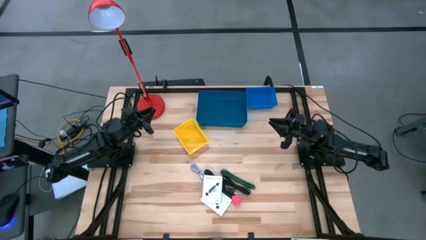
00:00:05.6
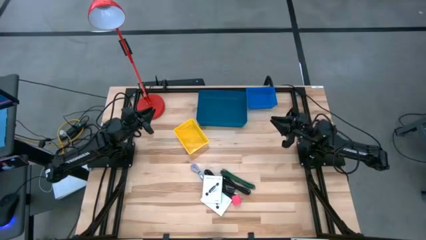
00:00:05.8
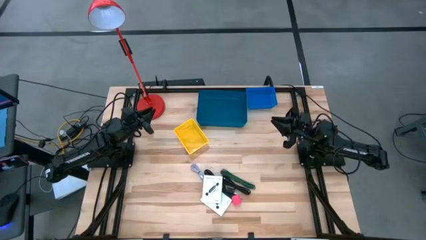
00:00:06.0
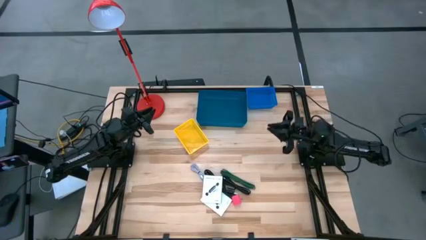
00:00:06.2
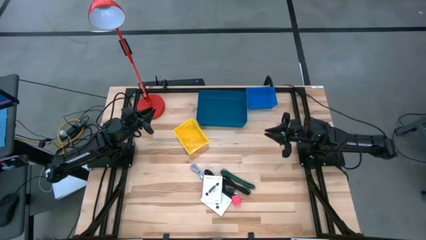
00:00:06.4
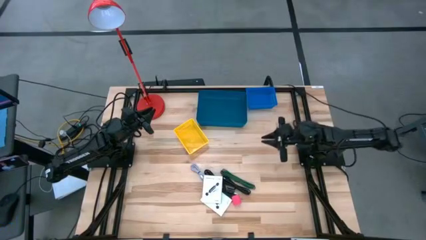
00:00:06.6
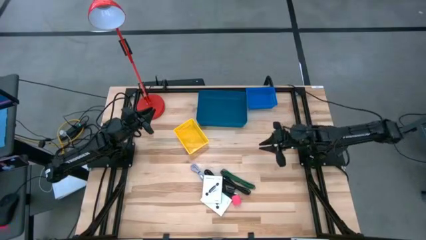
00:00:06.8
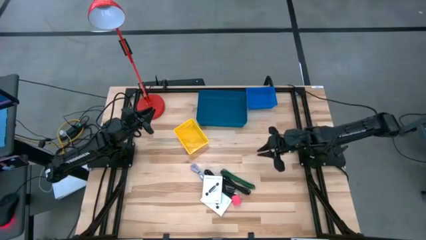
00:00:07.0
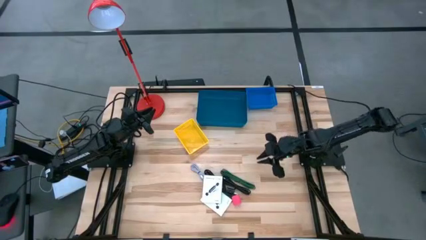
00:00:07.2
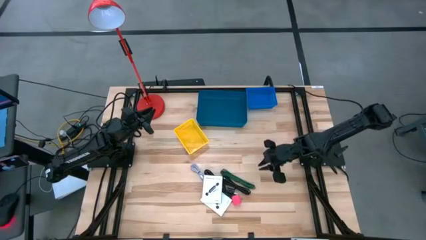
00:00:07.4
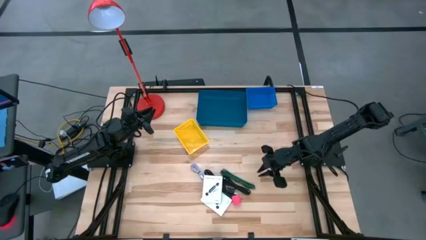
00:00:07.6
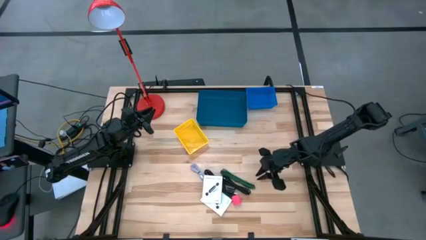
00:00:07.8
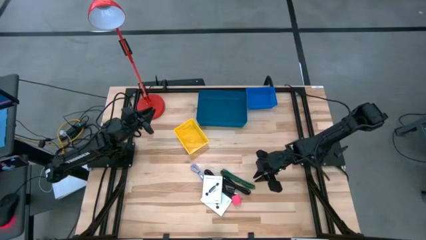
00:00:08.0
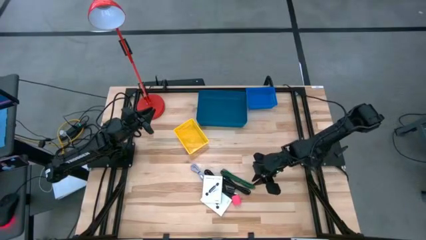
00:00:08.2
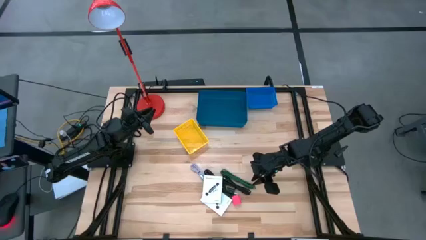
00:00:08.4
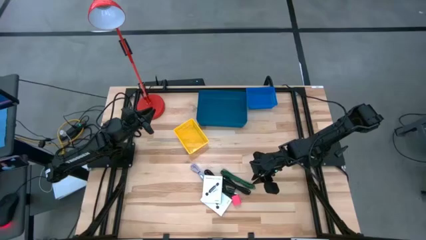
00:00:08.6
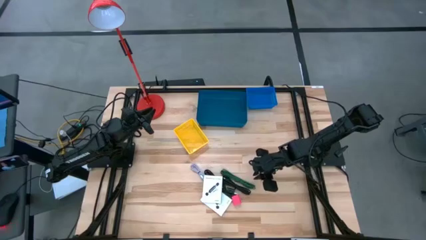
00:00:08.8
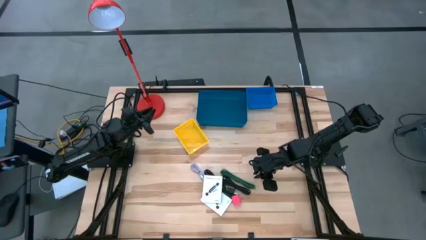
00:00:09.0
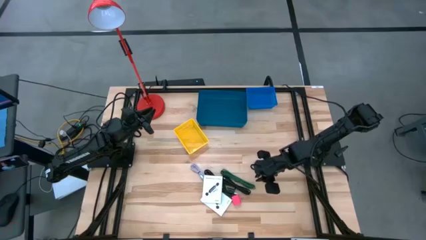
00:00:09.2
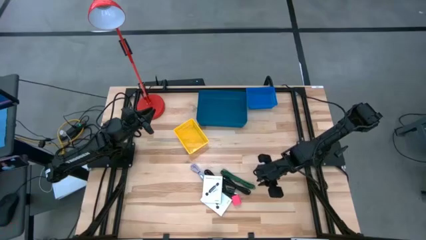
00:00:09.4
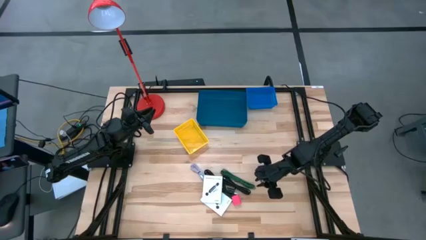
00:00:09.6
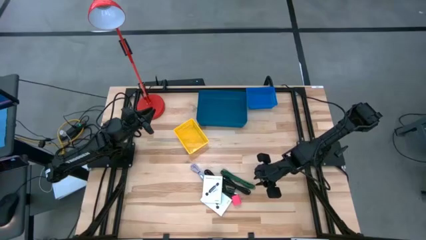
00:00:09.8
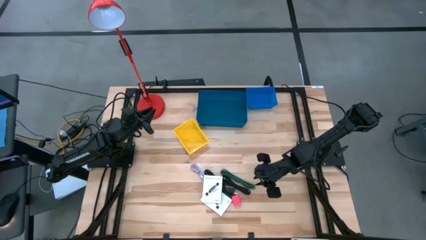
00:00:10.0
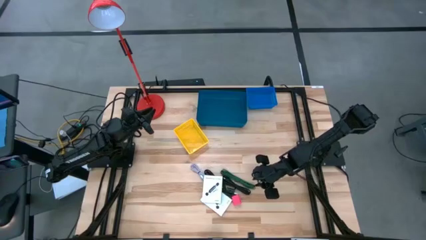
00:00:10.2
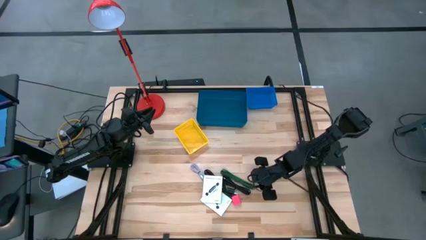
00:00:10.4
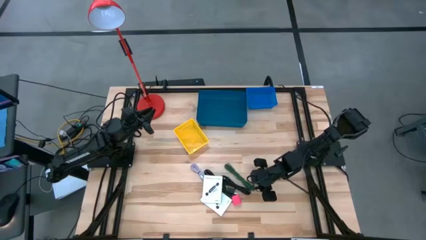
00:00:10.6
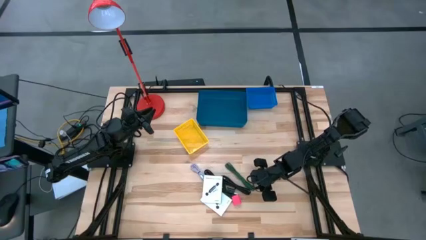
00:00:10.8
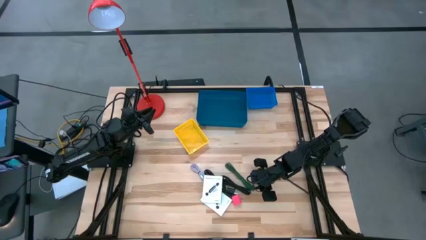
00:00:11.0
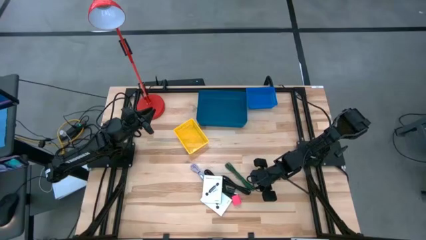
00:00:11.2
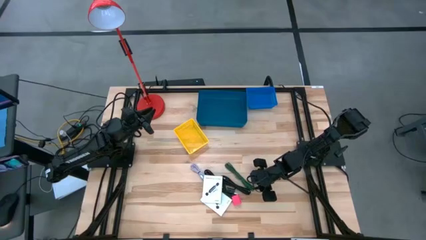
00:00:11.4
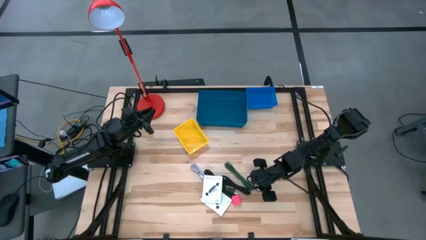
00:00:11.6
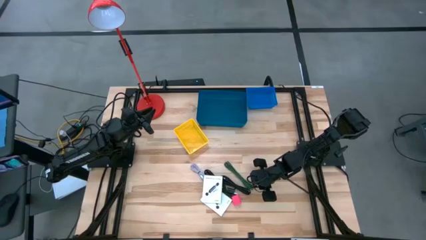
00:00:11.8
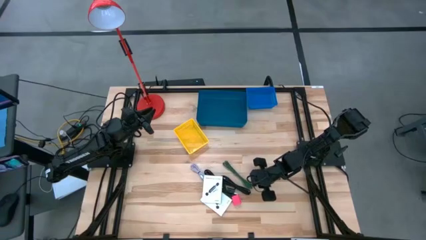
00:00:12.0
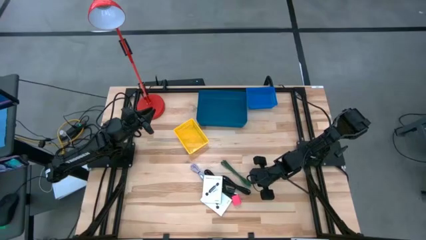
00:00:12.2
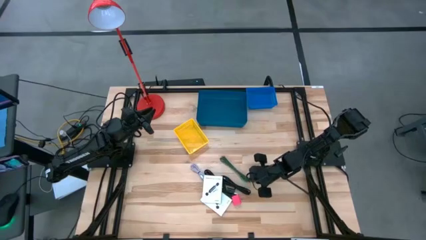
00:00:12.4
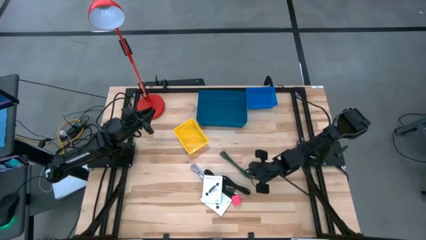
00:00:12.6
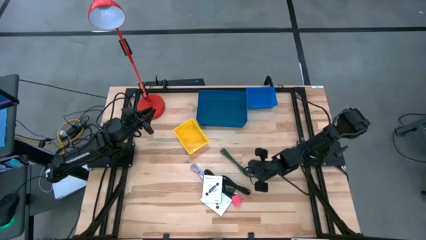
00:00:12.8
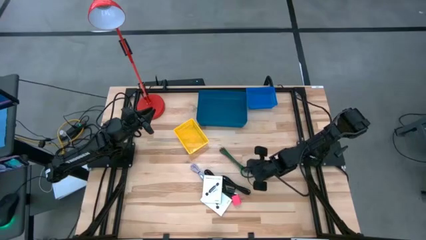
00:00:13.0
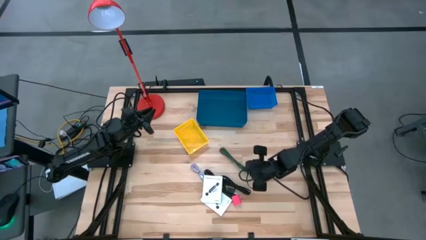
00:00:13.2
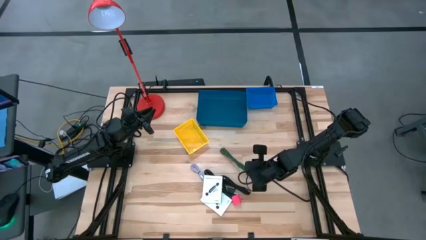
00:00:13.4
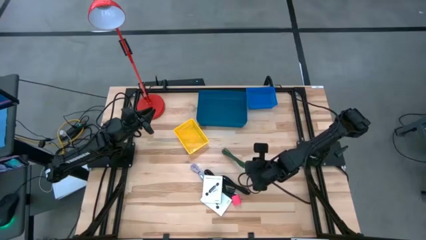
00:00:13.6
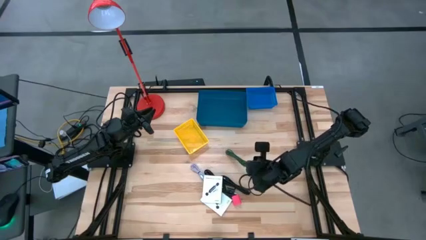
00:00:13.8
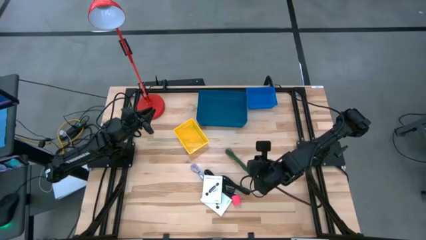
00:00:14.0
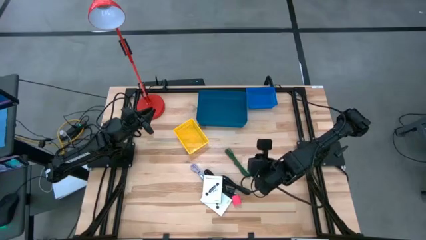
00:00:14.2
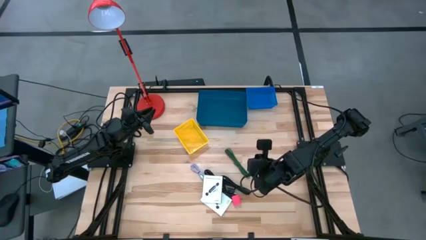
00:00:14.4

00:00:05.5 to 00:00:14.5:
Task: Pick and place items into bin
Put the green charger cable into the dark blue bin

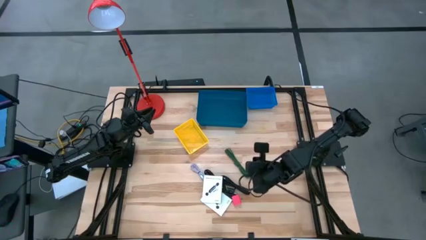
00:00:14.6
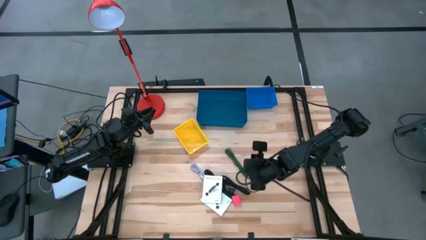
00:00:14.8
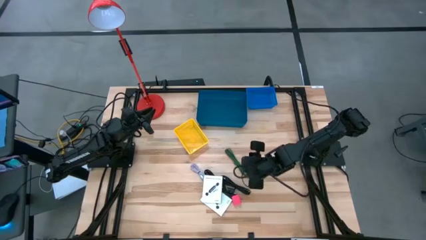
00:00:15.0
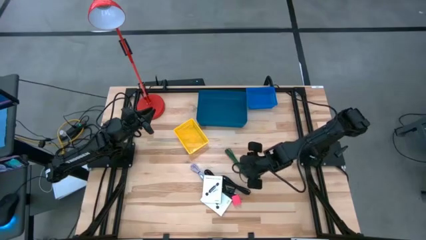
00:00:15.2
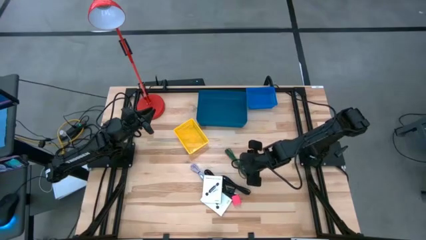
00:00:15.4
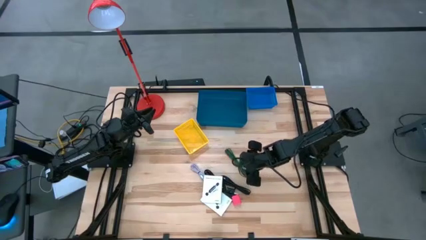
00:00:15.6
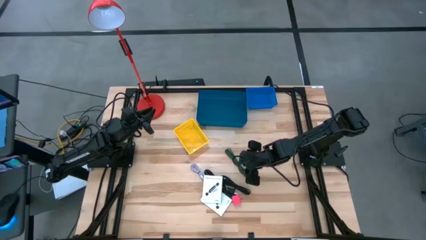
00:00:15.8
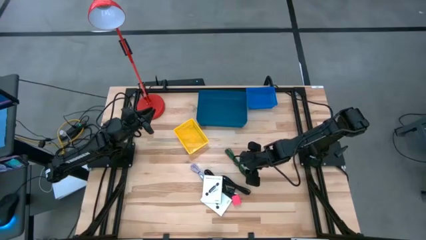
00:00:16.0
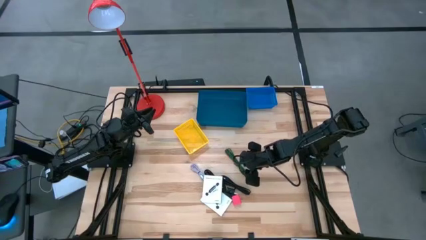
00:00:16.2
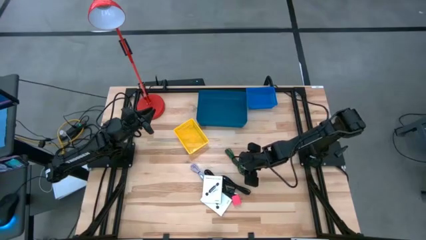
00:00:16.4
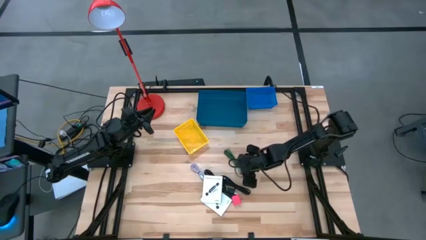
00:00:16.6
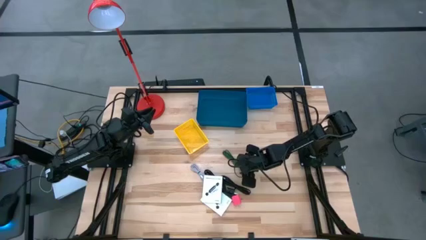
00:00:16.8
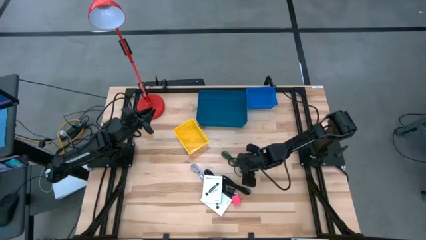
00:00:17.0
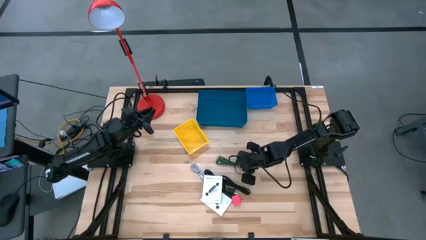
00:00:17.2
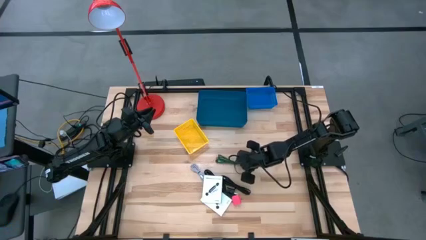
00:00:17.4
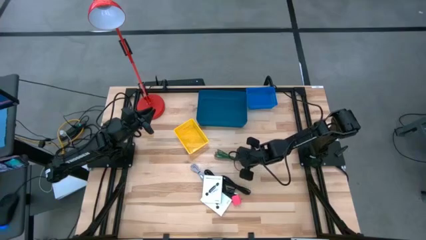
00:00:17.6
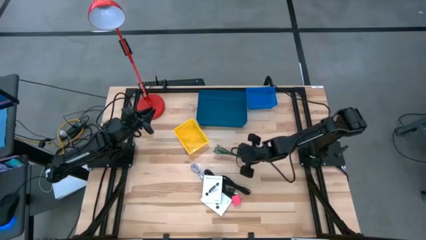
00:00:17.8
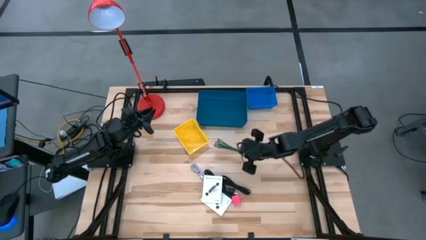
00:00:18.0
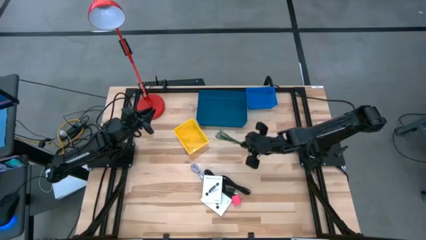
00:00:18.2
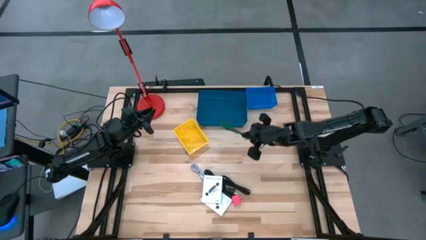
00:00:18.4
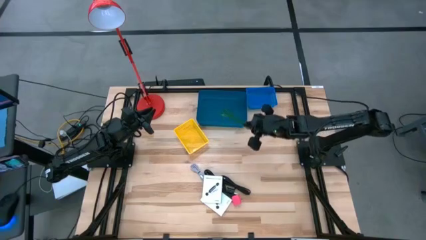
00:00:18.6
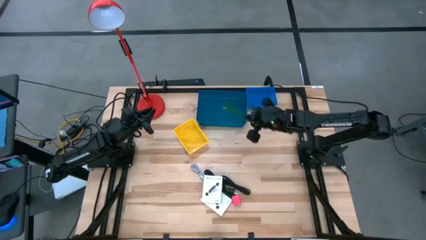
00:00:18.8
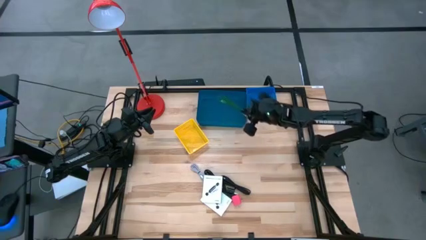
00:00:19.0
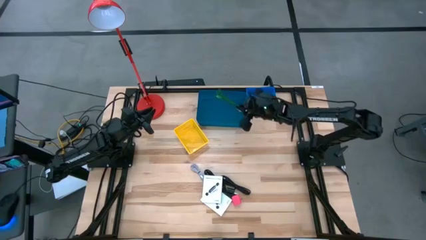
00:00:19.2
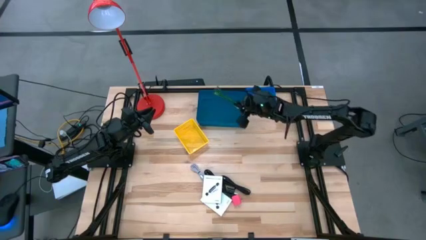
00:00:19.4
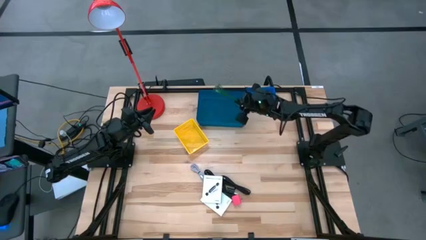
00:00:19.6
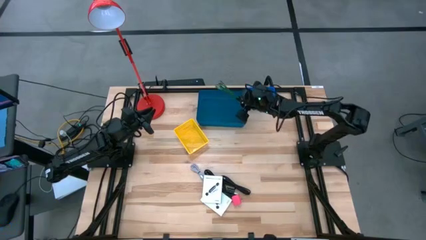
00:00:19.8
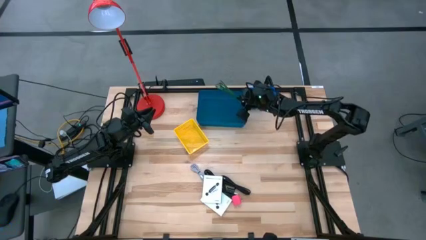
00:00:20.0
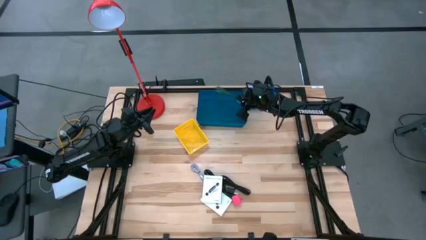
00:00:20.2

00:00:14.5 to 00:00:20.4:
Put the green charger cable into the dark blue bin

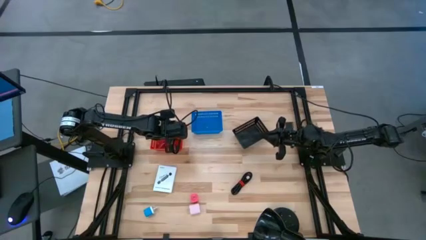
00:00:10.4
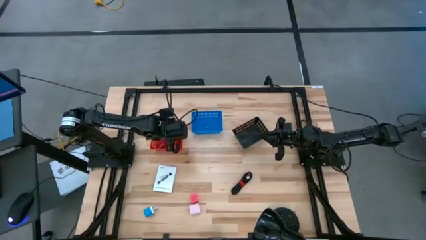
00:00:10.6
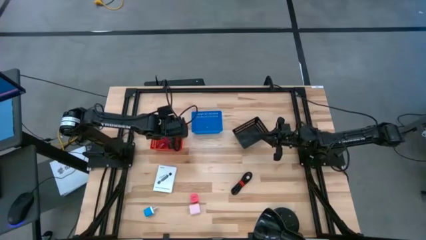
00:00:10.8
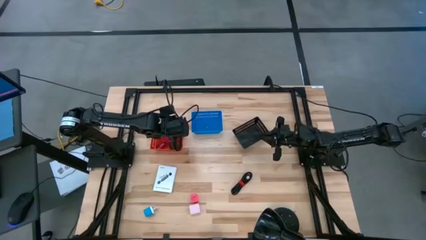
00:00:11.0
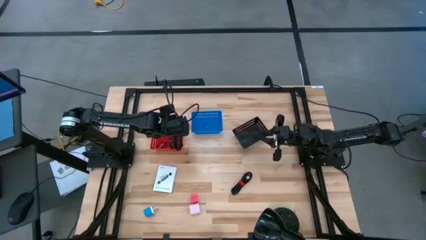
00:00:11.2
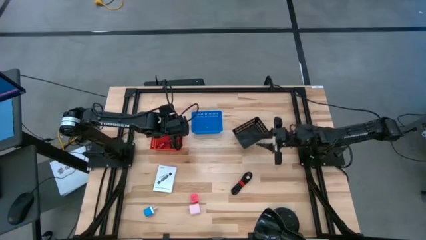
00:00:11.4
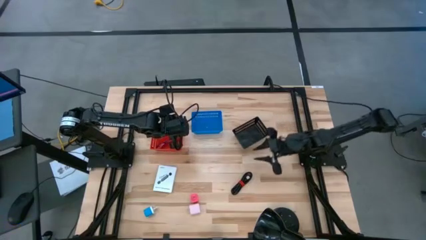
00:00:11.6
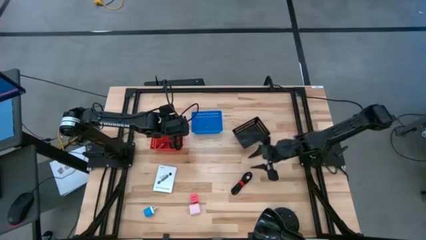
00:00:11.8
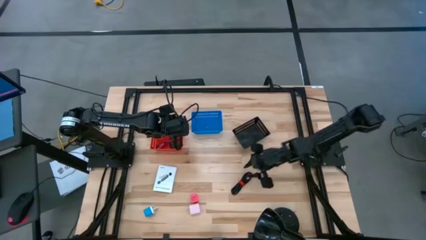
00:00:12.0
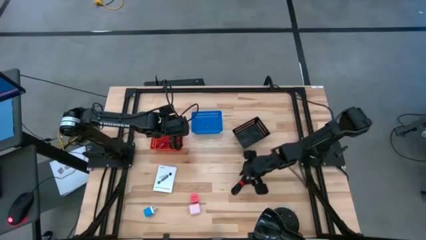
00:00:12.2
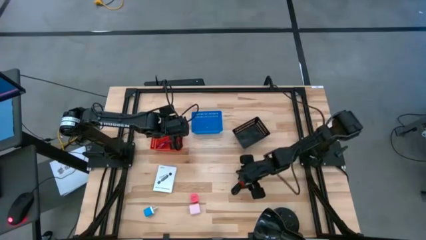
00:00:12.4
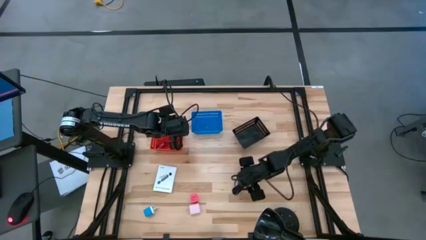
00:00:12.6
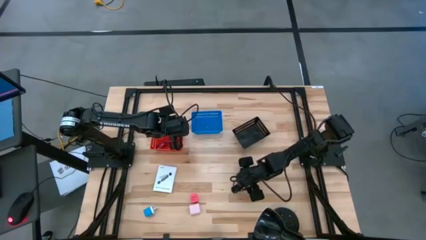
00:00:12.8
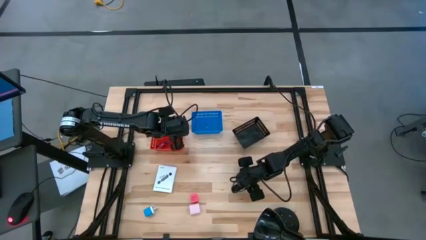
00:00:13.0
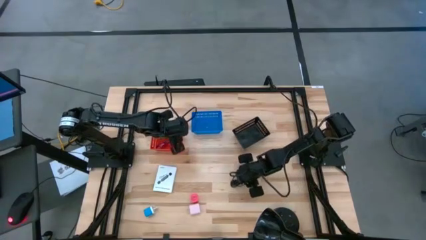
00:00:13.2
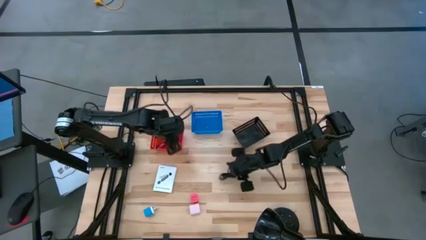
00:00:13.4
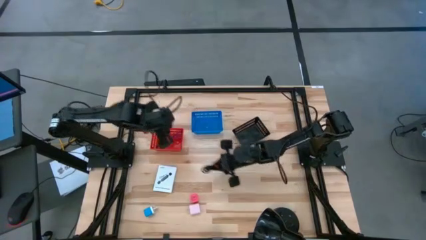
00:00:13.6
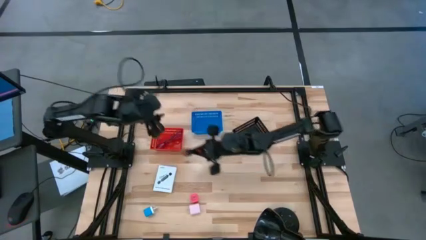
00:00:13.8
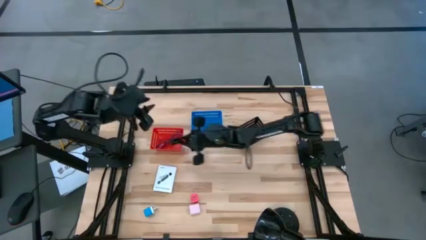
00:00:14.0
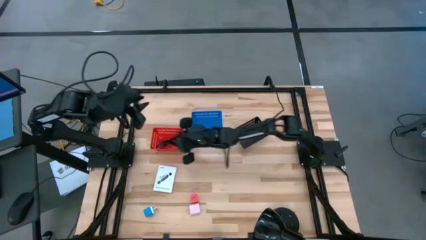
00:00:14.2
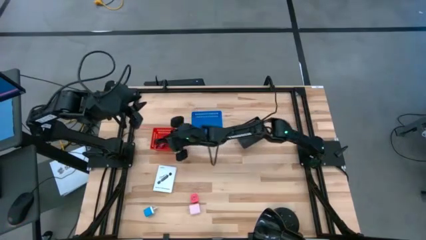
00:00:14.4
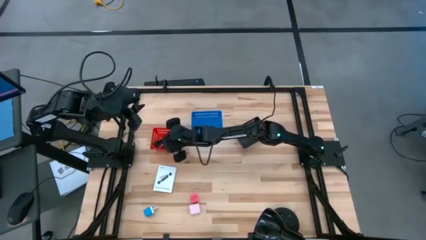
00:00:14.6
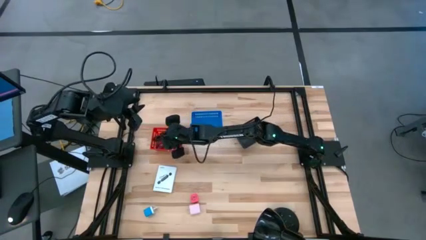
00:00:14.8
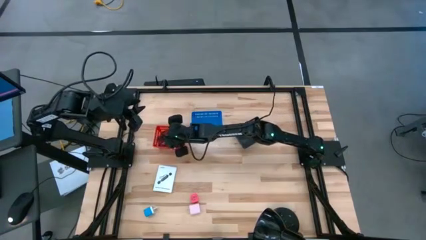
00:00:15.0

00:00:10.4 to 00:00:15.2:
Task: Pick and place items into bin
Put the black usb charger cable into the red bin
